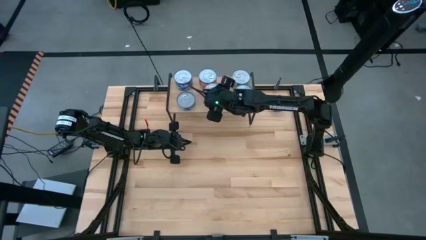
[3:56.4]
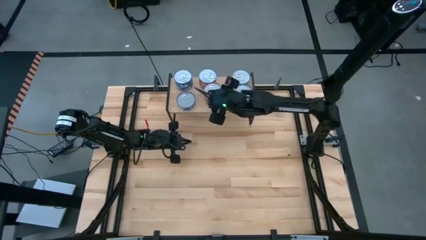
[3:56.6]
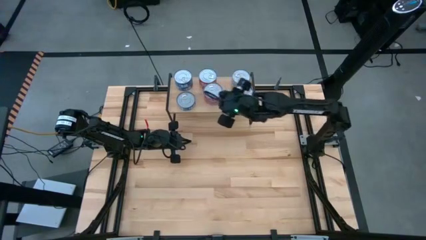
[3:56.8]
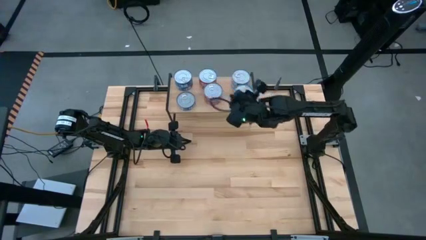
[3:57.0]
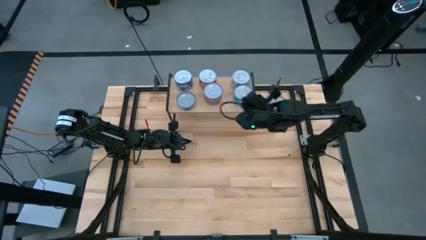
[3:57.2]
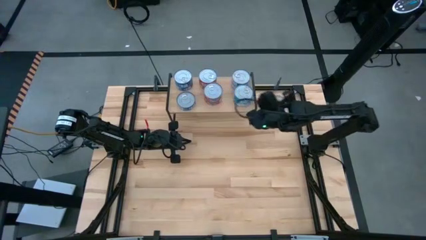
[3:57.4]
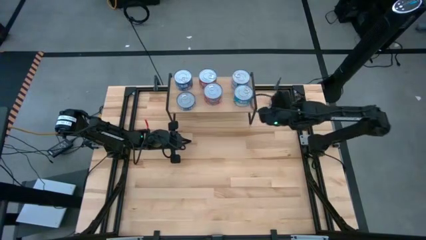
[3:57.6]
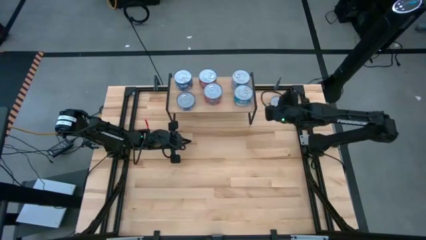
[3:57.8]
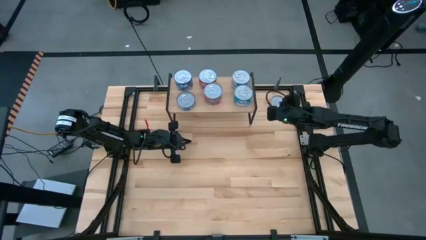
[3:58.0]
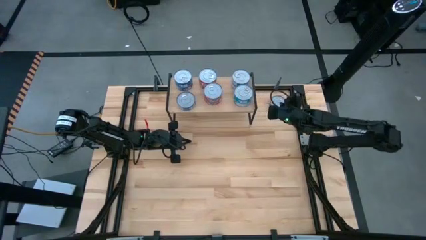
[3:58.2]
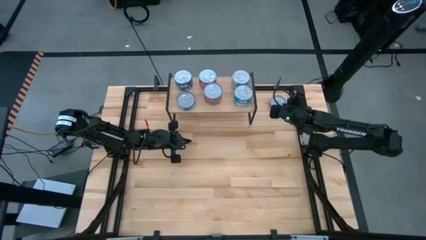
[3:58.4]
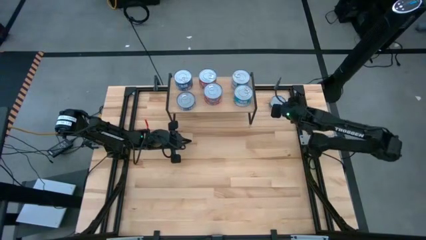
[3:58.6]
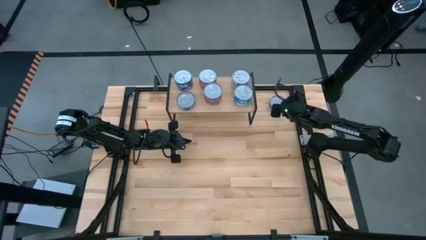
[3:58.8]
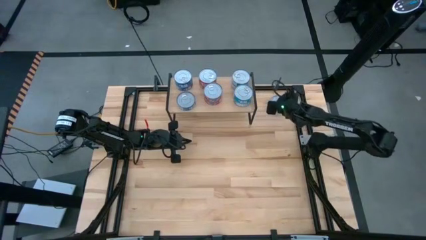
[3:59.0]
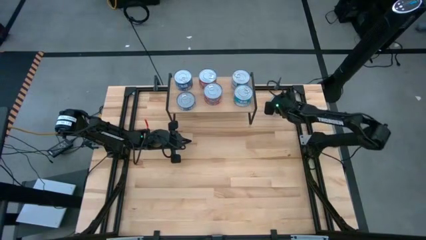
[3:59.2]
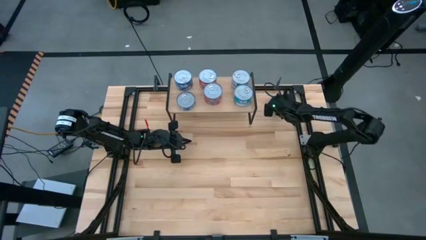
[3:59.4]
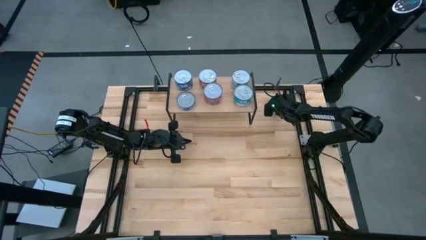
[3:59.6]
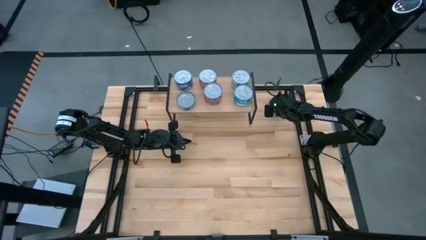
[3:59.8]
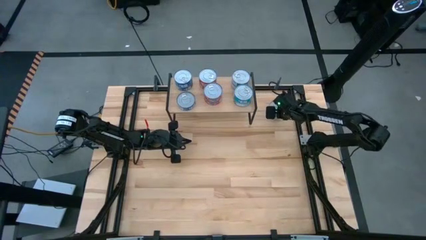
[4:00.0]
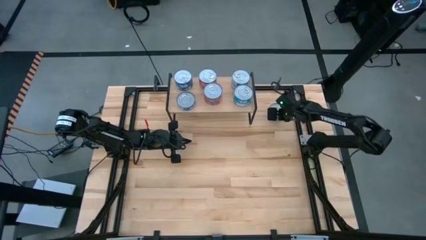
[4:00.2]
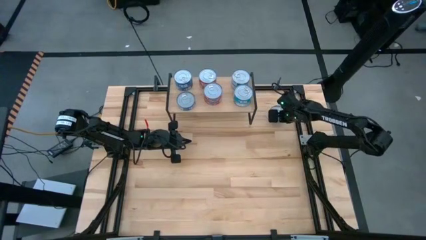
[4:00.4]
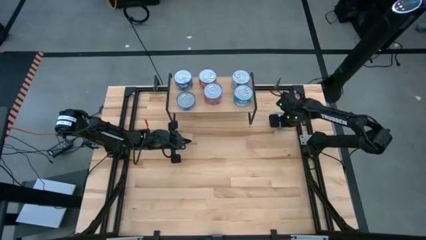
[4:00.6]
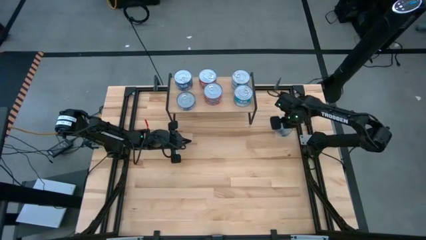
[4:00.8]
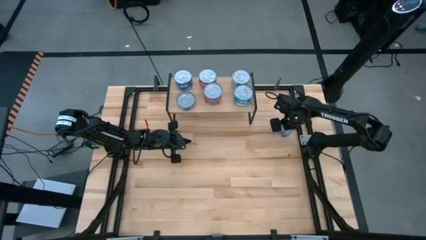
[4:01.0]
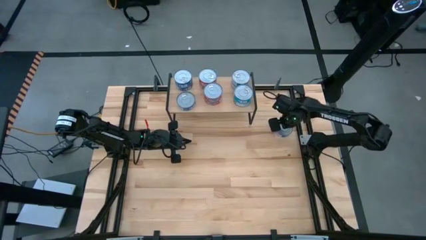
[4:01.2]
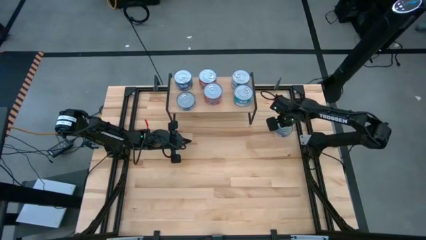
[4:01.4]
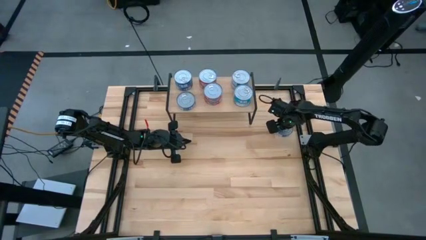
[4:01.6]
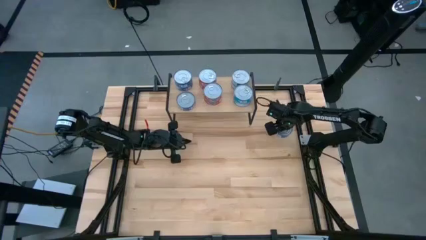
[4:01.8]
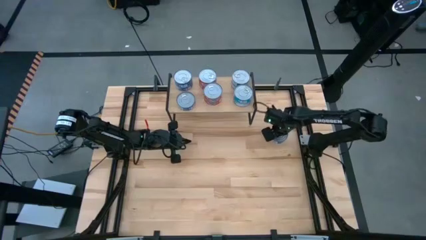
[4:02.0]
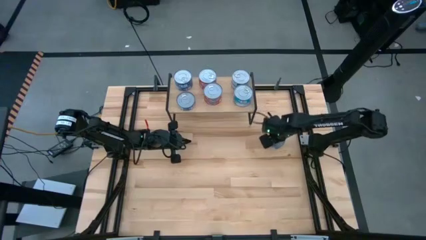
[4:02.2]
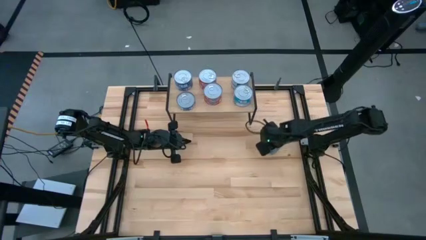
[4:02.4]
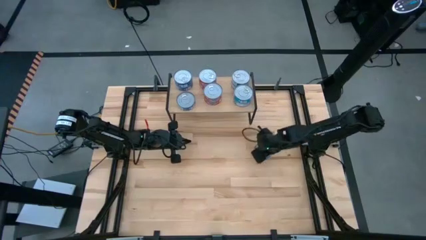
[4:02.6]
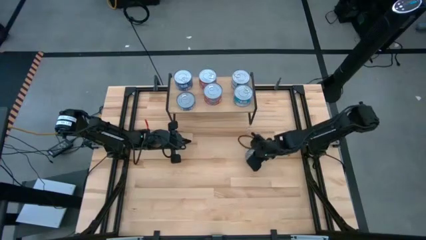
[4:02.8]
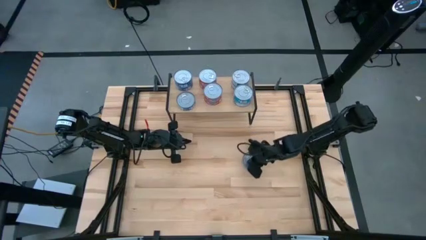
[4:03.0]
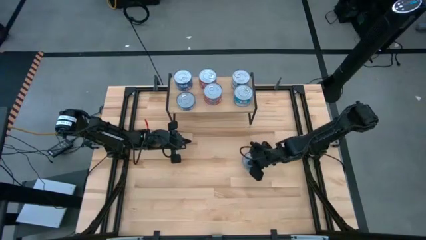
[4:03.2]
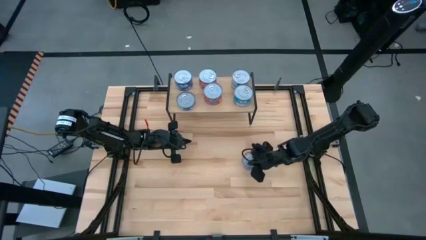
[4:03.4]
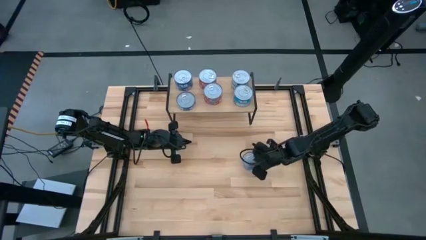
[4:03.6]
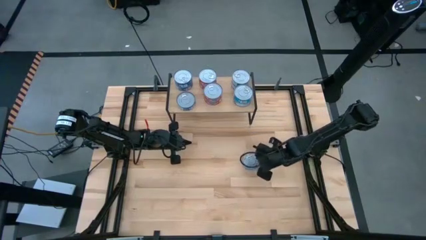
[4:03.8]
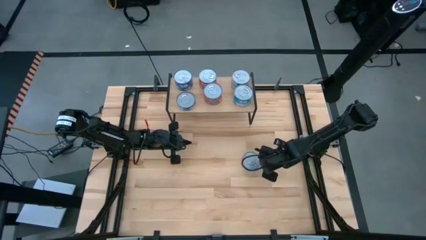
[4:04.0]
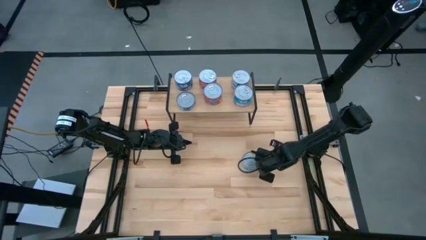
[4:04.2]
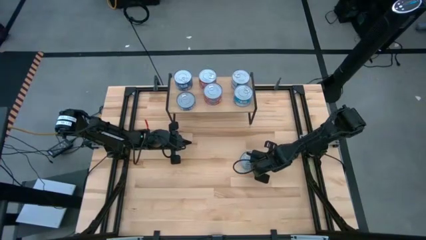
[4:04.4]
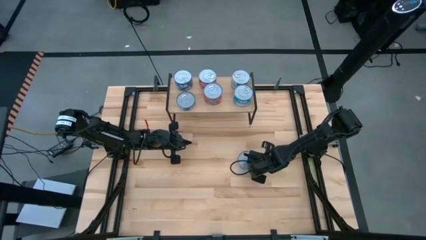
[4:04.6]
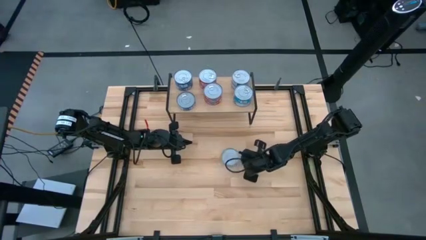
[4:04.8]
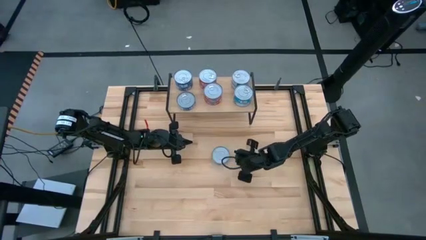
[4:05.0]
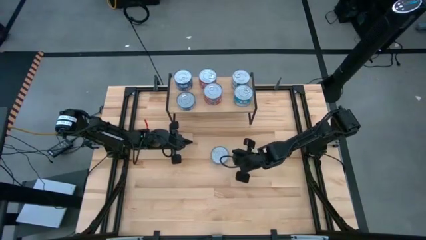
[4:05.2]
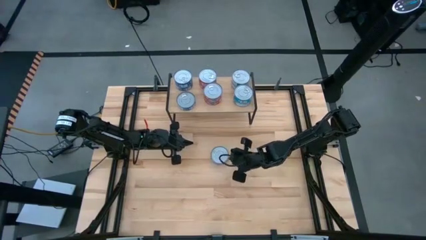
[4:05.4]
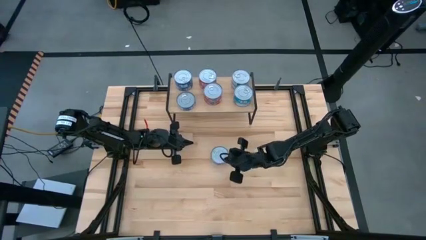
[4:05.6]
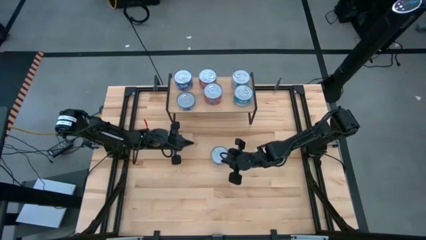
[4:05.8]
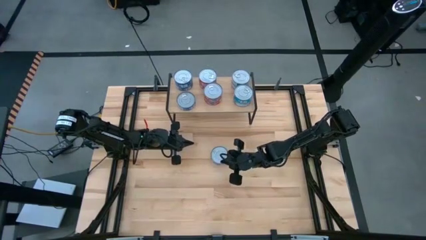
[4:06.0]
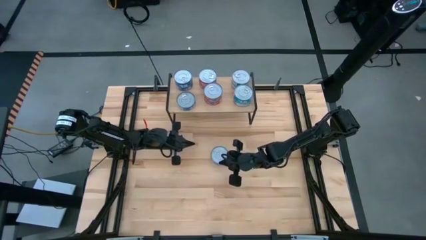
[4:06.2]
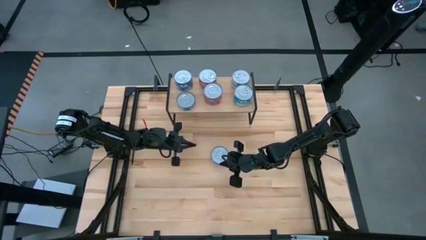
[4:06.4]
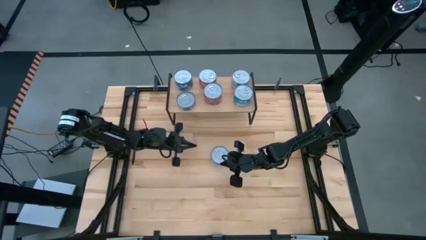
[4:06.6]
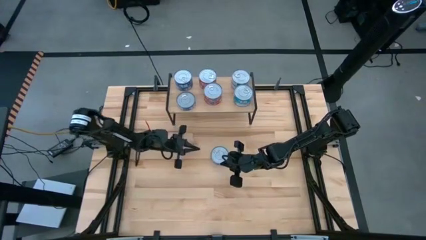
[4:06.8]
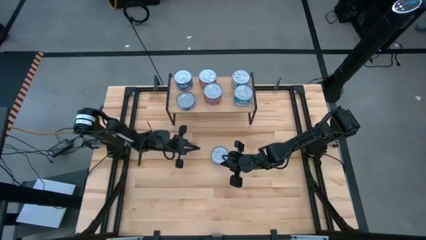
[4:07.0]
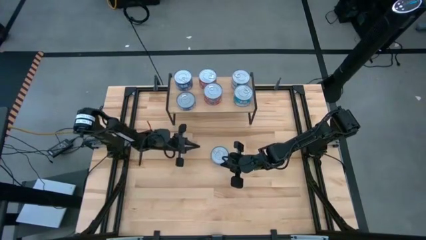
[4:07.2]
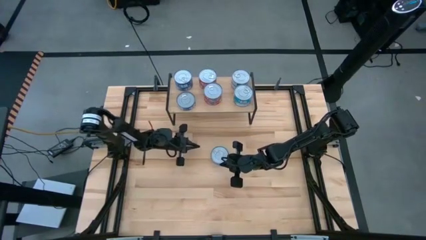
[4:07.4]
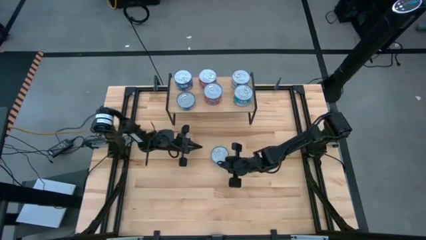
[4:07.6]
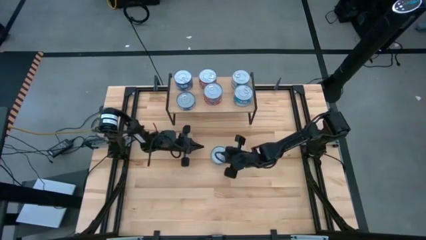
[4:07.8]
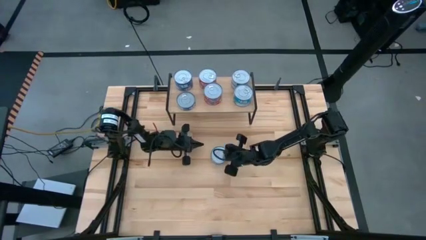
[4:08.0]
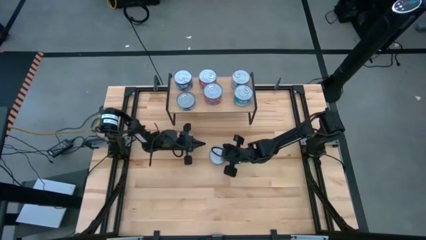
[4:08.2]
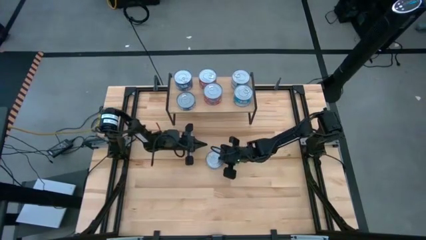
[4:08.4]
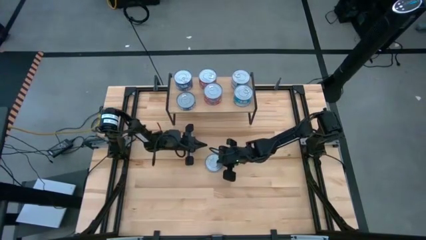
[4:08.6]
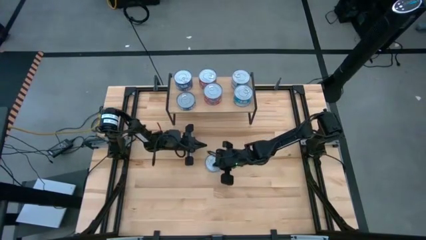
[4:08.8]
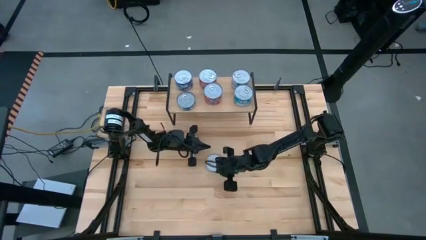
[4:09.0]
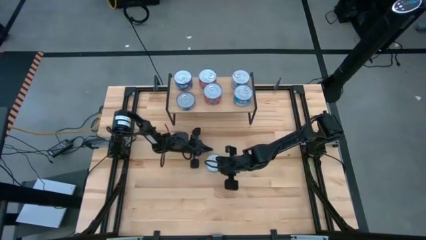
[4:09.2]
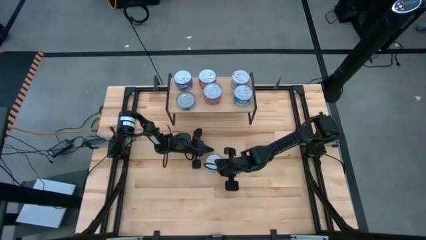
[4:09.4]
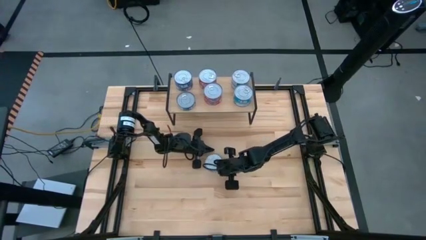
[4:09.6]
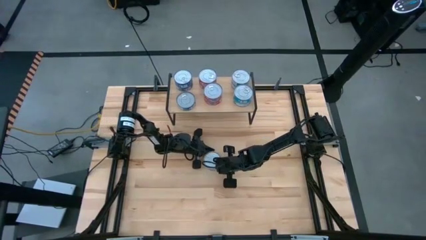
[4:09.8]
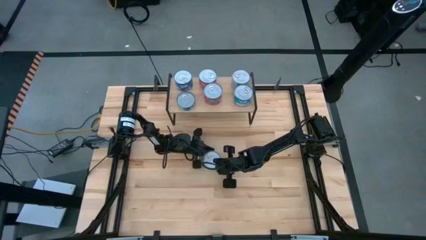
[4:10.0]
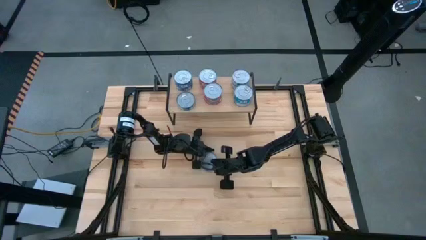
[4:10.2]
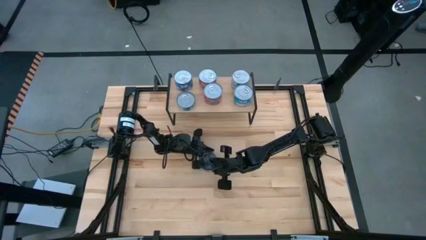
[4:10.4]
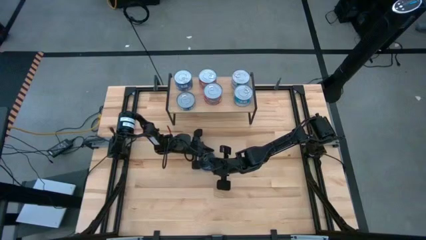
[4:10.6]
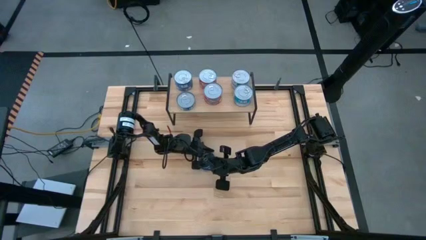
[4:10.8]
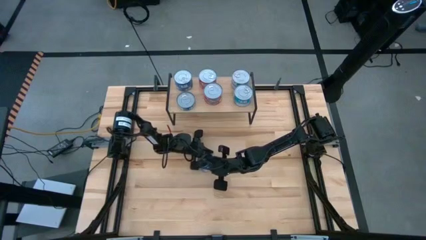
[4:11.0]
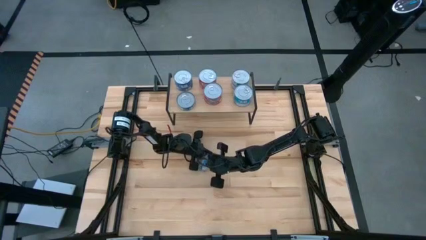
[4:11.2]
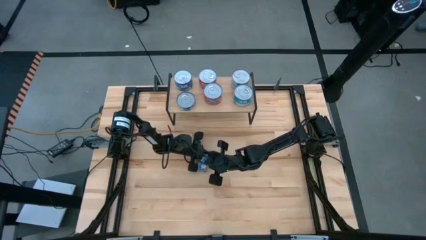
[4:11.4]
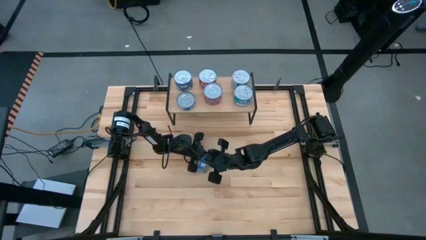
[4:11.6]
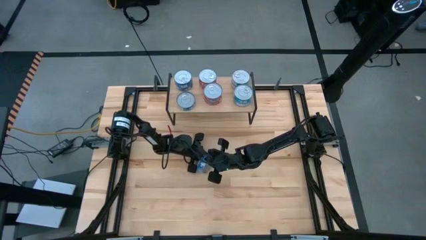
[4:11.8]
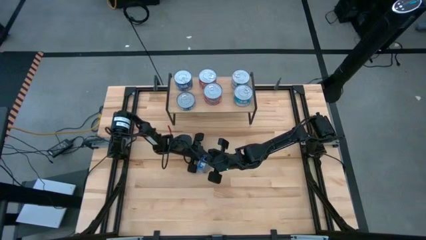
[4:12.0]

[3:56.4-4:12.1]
Task: Stack canned seafood by type on shelf
Stack the blue tuna can on top of the blue tuna can on the shelf
